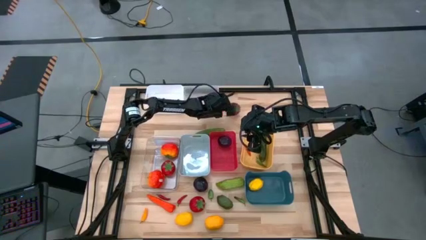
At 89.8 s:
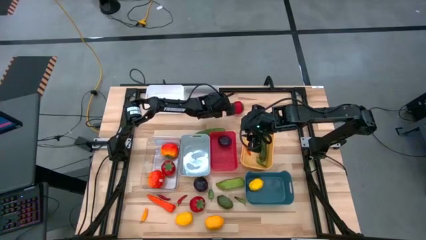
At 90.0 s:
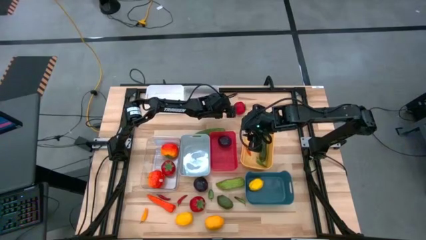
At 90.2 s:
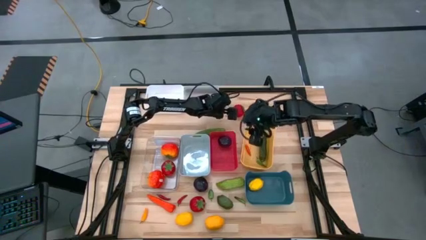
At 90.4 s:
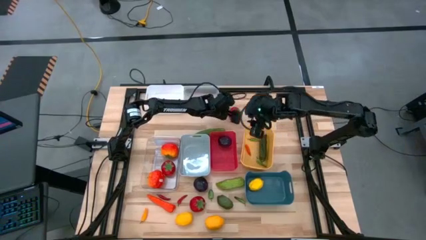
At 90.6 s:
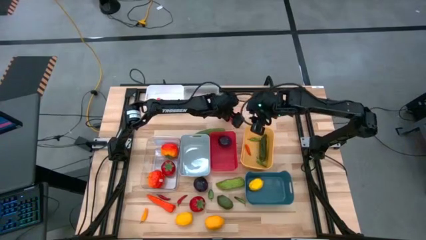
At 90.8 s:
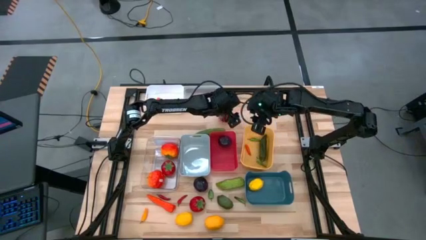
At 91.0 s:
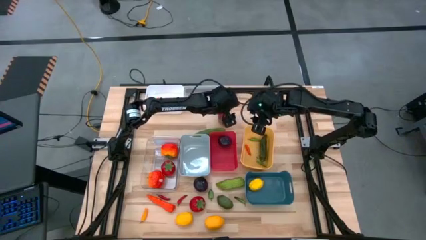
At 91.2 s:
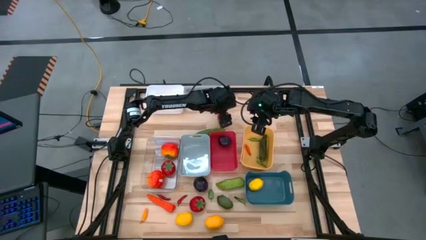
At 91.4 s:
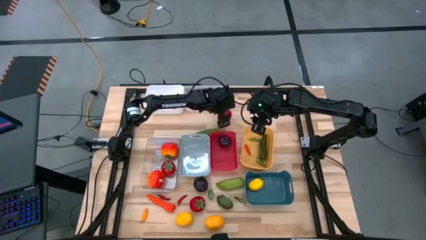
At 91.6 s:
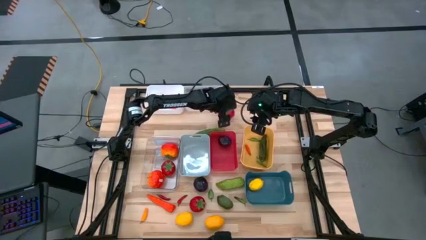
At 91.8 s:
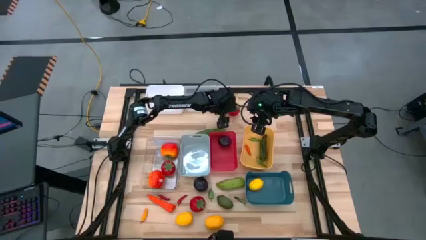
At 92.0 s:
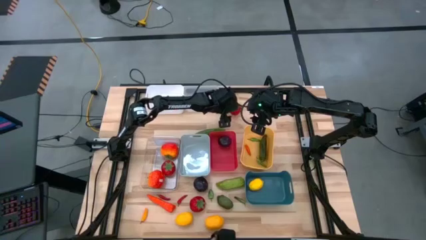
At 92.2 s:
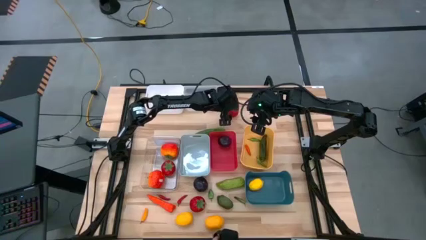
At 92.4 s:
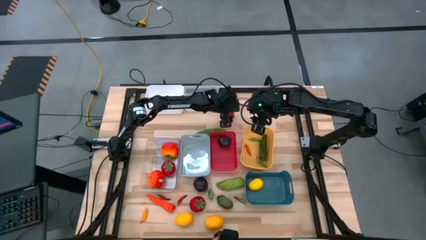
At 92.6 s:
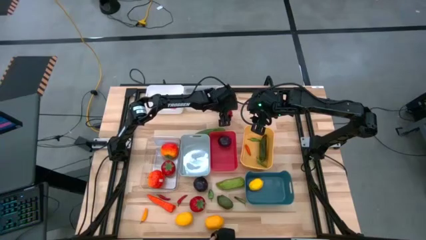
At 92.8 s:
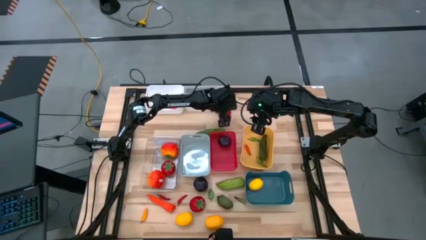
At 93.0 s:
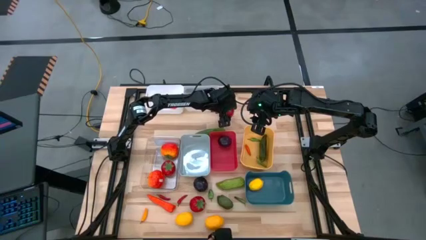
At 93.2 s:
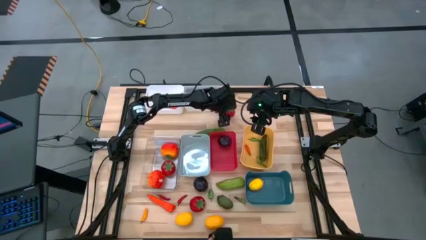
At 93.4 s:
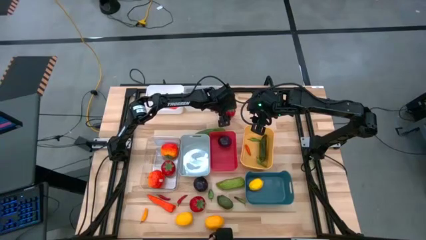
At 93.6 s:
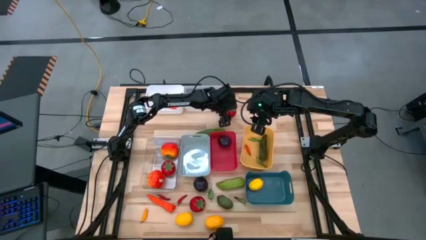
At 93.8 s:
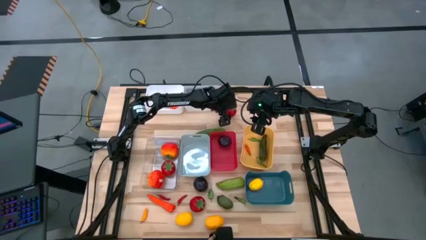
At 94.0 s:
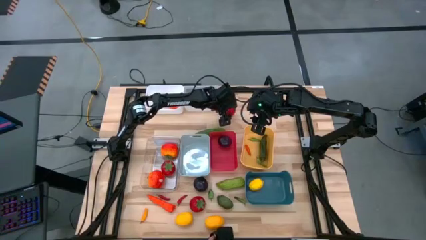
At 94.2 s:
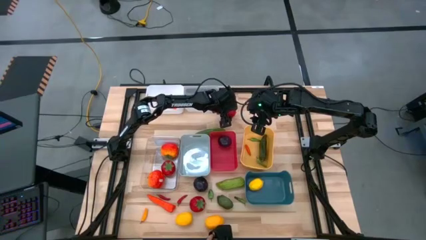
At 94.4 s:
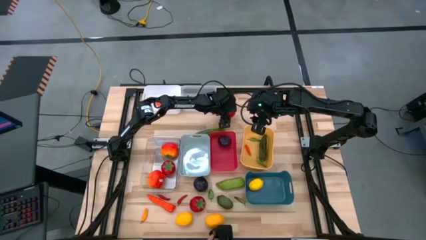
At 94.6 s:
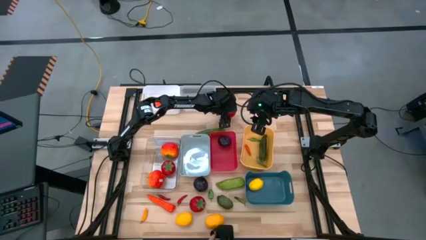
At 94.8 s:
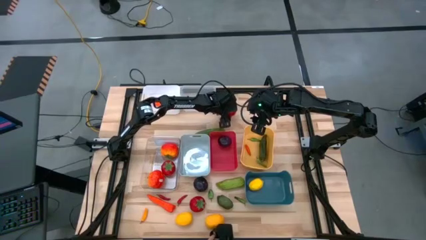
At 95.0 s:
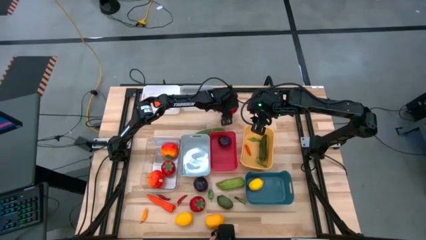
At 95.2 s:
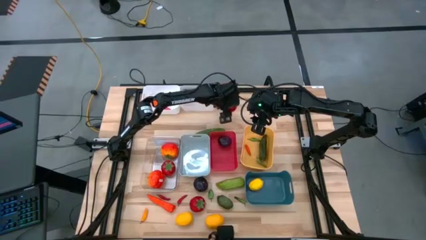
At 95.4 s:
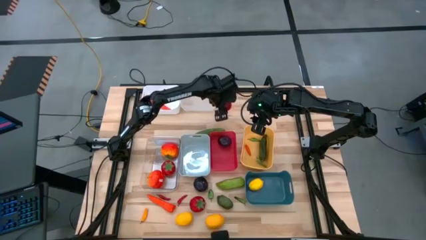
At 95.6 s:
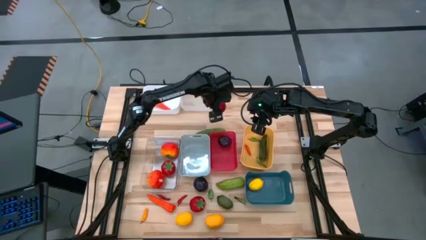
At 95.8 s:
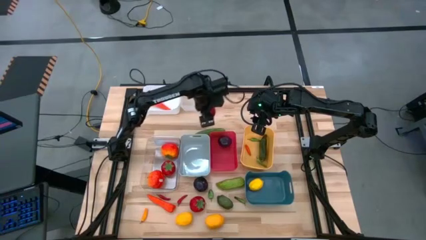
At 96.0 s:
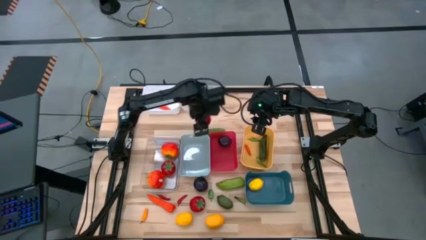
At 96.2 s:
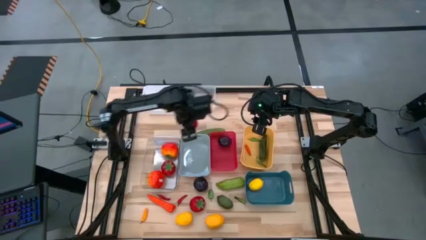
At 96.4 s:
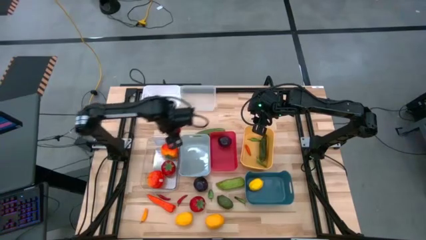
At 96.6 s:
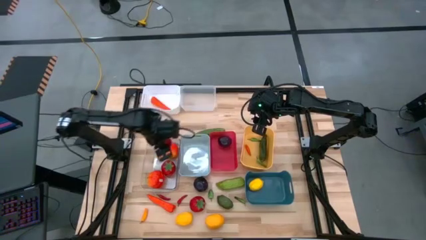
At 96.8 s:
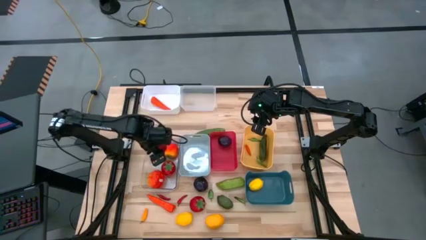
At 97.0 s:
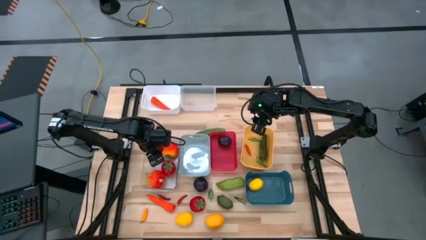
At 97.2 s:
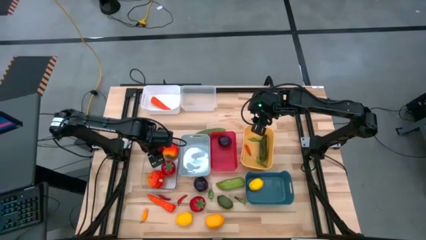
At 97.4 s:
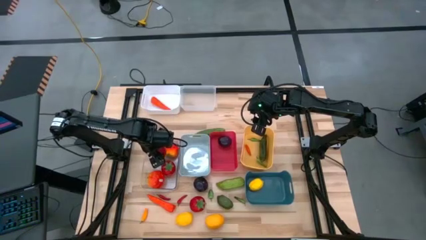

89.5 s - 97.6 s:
Task: Sort produce into baskets
Put the red tomato into the bottom transparent bin

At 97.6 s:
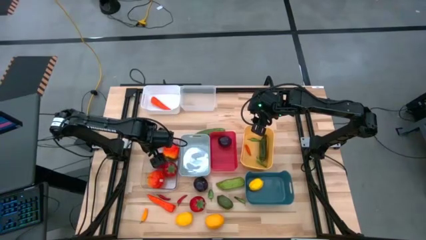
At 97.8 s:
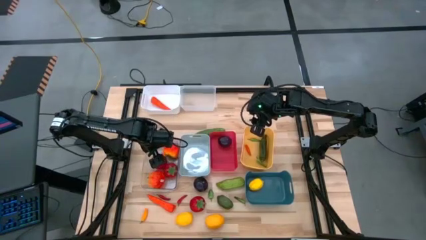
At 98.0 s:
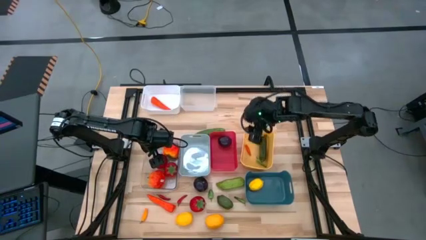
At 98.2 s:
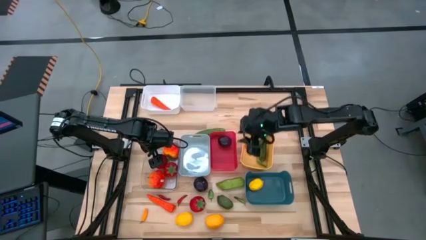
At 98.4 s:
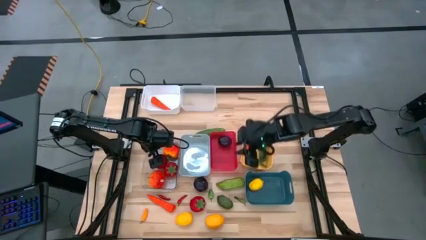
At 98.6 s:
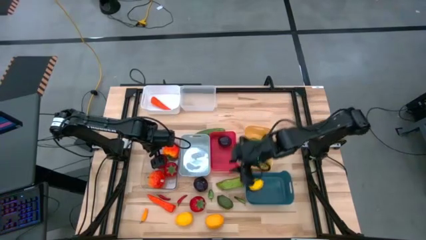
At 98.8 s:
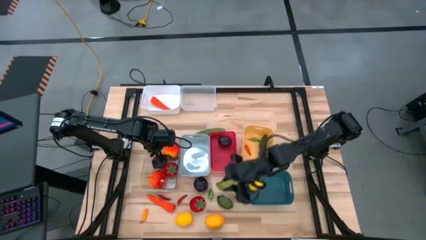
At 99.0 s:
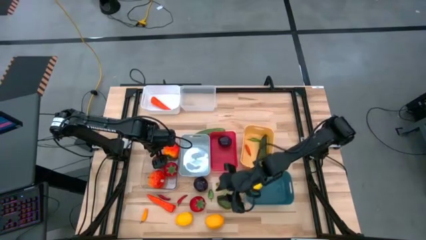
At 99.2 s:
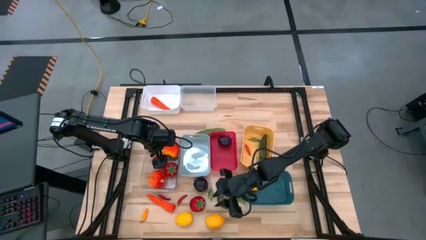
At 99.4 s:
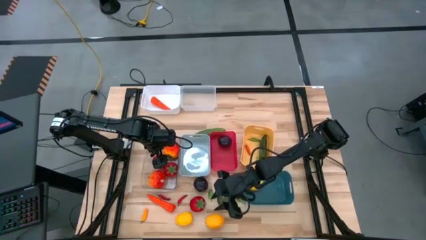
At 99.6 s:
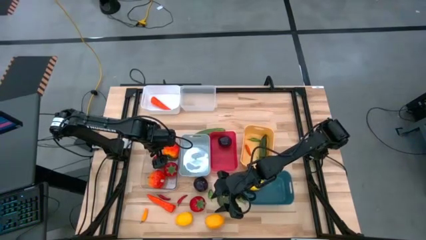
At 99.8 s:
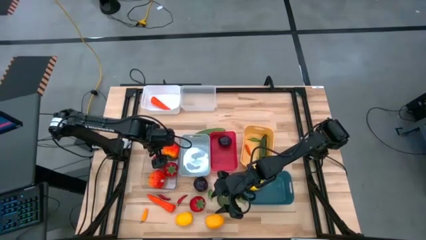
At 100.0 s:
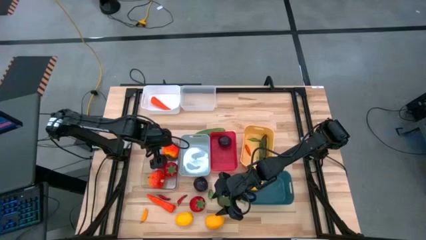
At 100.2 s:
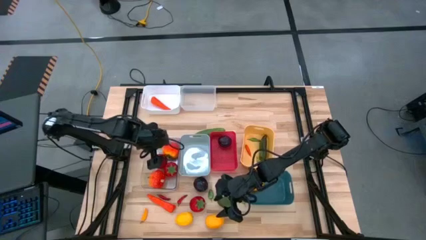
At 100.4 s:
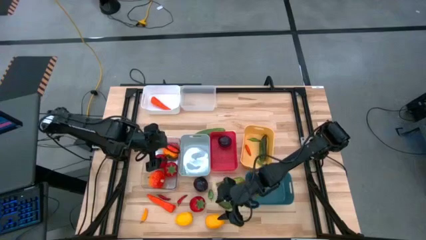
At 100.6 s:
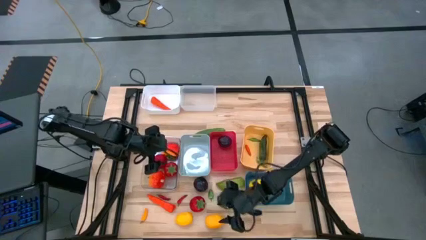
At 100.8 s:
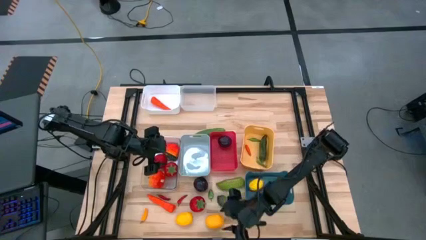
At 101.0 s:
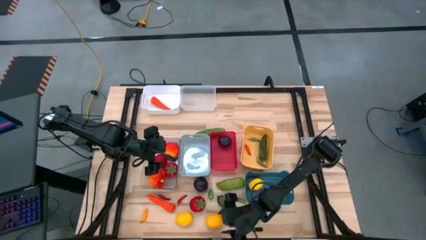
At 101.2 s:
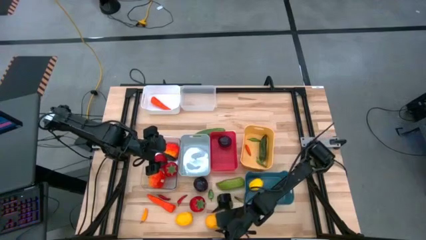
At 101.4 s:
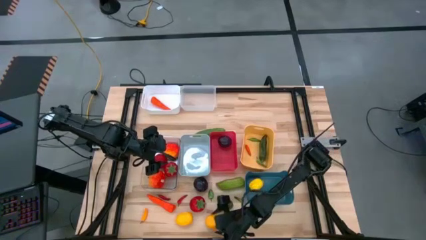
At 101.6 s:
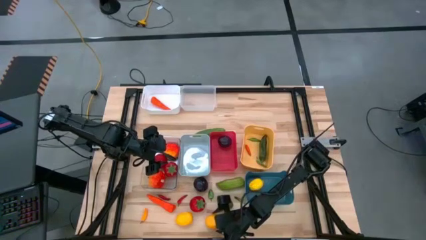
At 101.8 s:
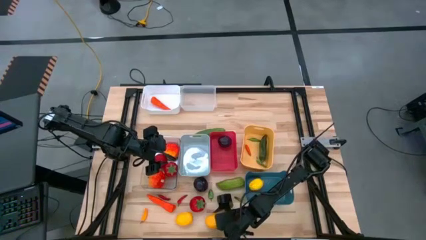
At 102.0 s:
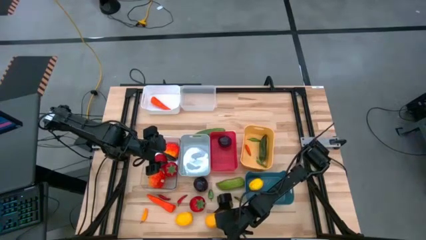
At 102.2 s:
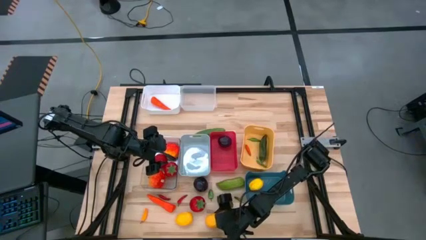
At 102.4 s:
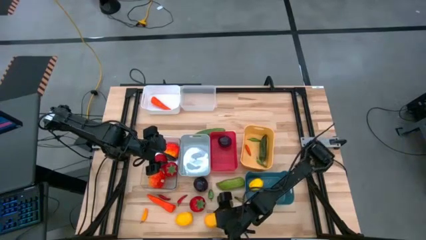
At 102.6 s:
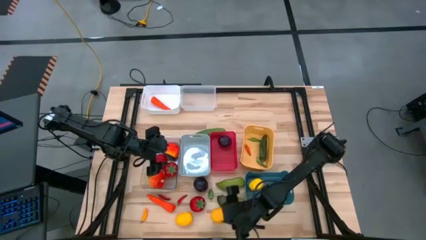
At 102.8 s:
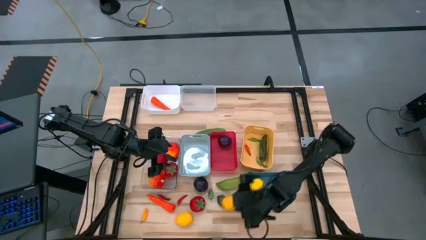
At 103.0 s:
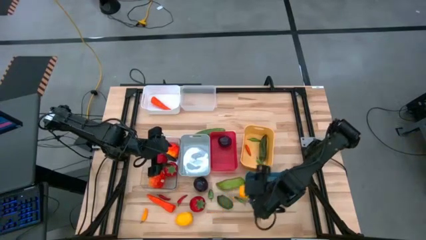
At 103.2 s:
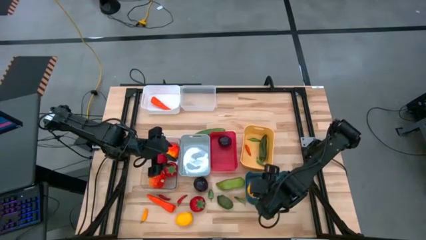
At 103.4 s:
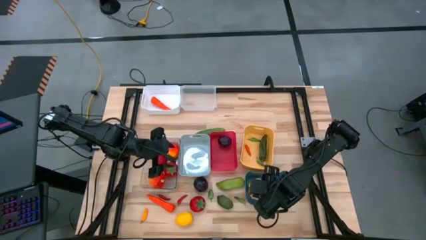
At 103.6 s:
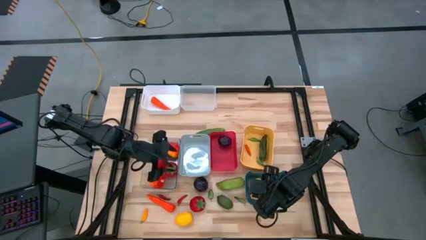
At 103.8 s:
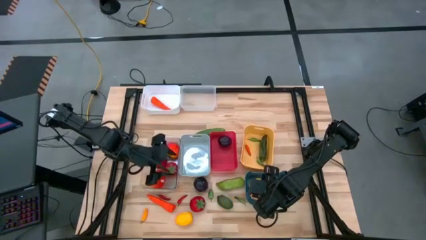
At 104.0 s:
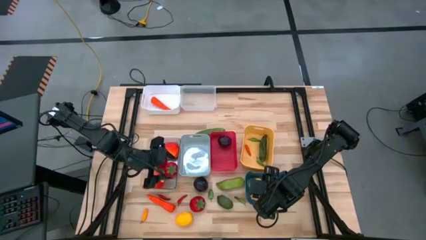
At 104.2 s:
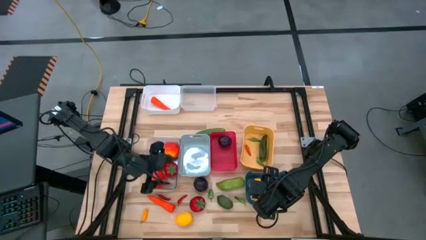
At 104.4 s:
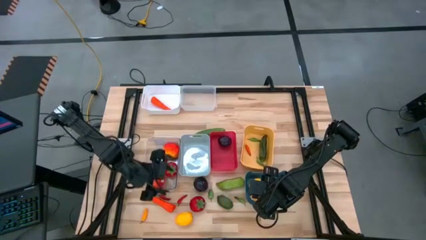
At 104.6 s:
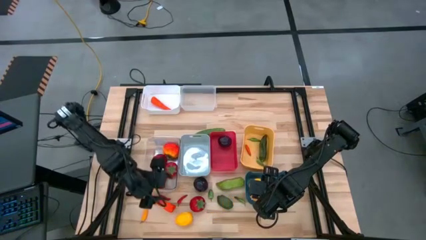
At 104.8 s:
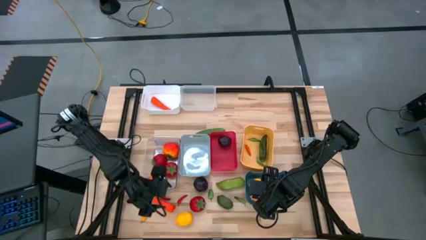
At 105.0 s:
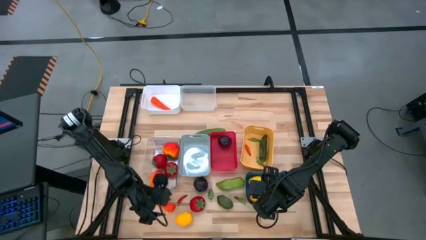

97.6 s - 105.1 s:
Put the lemon into the blue bin
